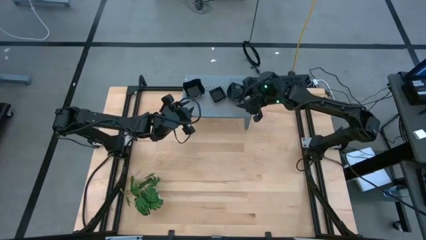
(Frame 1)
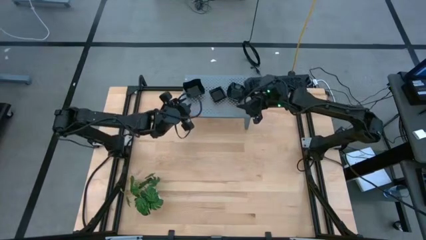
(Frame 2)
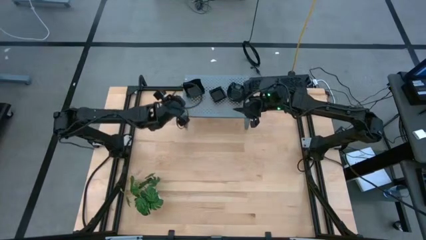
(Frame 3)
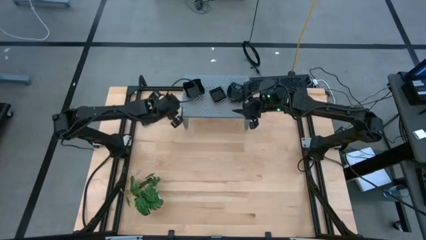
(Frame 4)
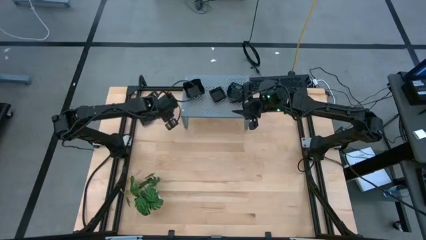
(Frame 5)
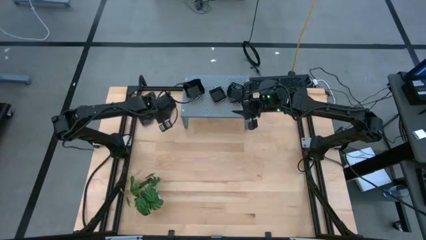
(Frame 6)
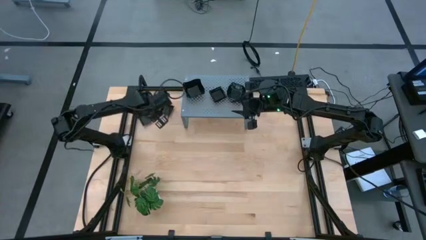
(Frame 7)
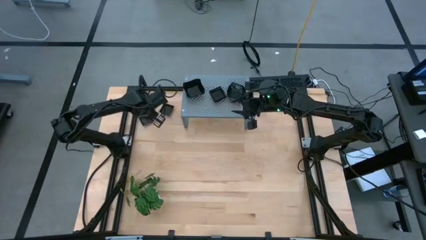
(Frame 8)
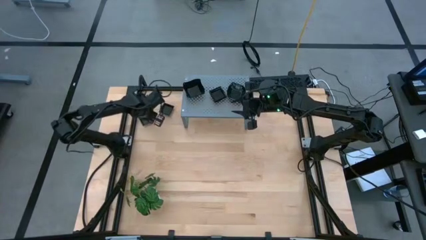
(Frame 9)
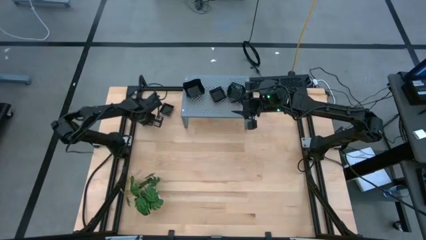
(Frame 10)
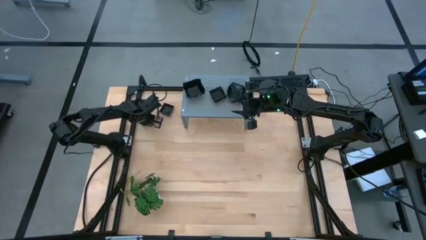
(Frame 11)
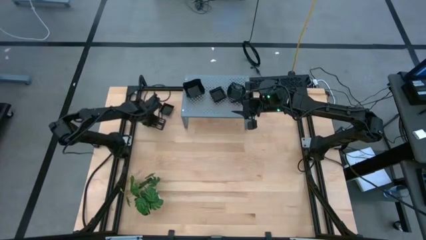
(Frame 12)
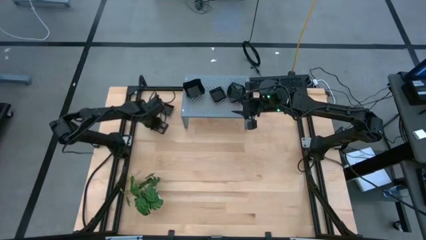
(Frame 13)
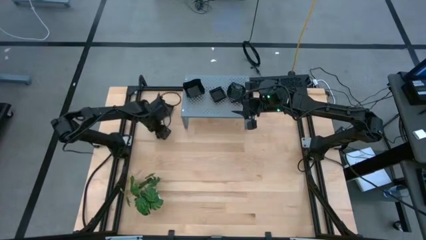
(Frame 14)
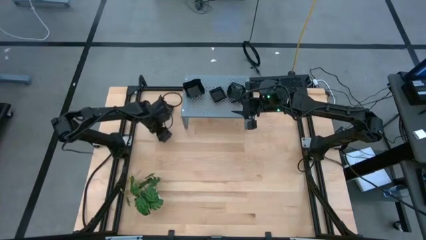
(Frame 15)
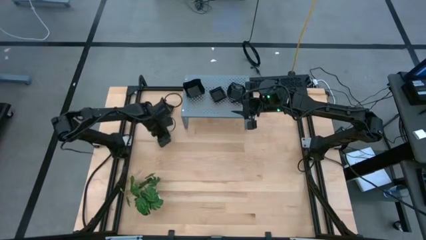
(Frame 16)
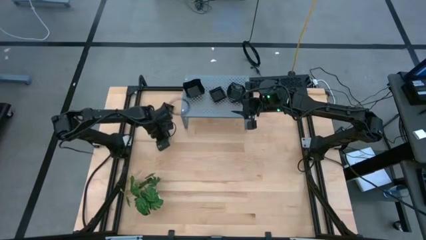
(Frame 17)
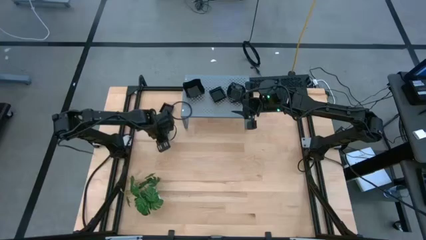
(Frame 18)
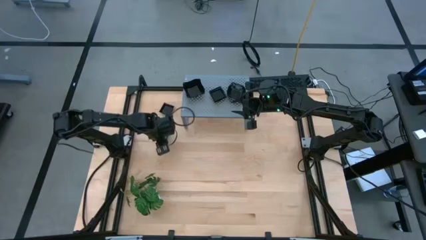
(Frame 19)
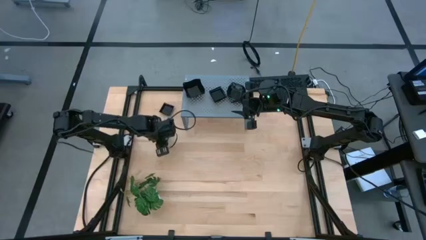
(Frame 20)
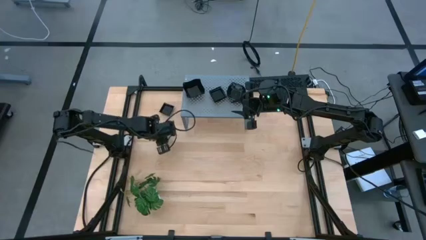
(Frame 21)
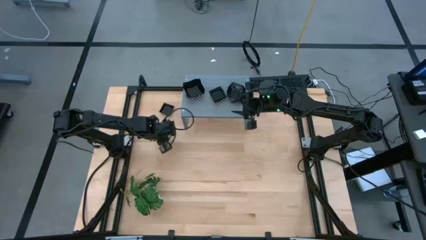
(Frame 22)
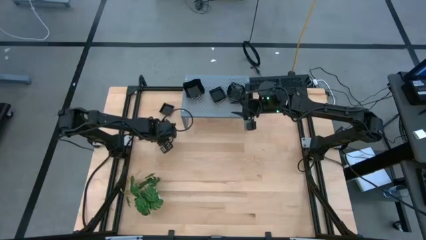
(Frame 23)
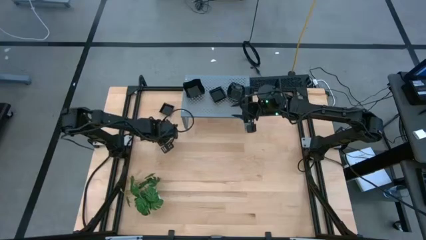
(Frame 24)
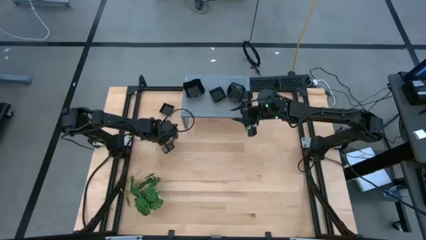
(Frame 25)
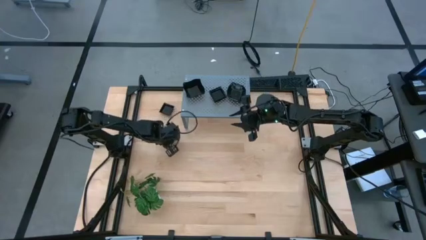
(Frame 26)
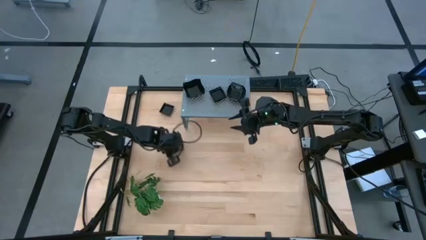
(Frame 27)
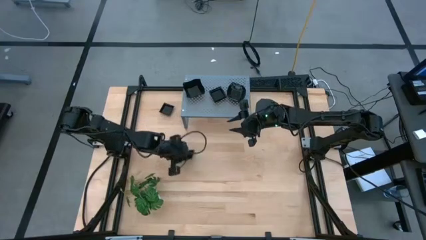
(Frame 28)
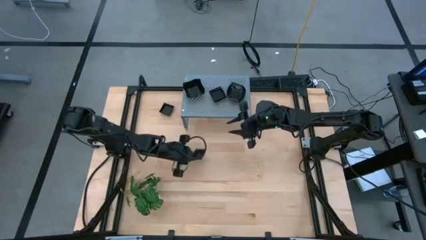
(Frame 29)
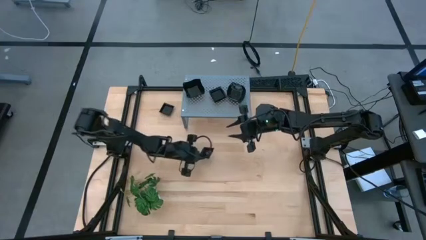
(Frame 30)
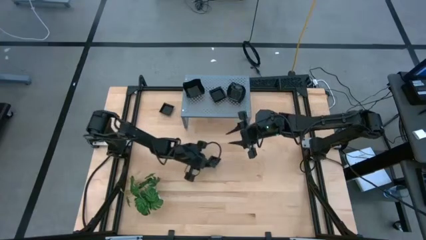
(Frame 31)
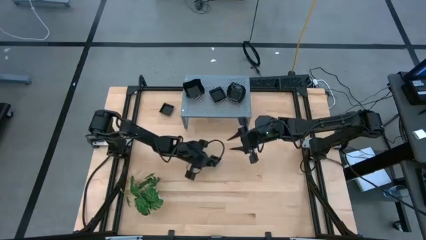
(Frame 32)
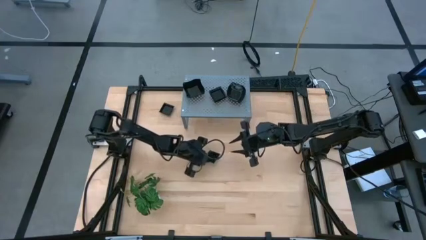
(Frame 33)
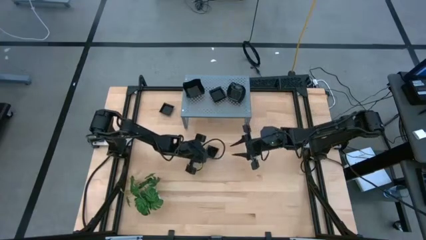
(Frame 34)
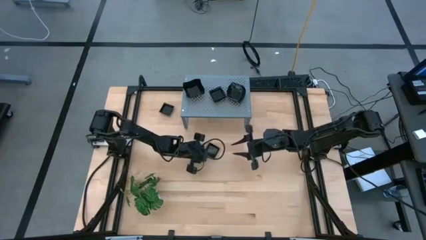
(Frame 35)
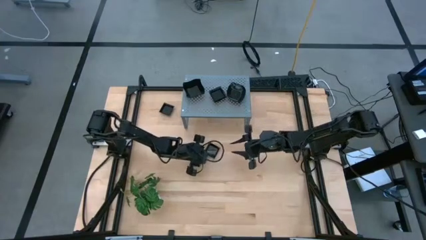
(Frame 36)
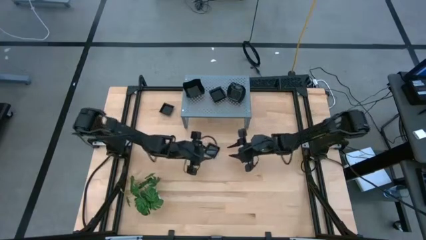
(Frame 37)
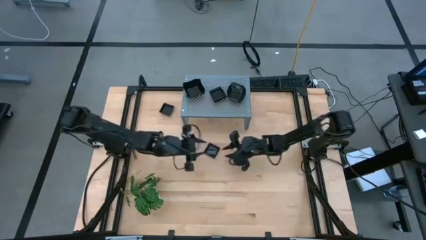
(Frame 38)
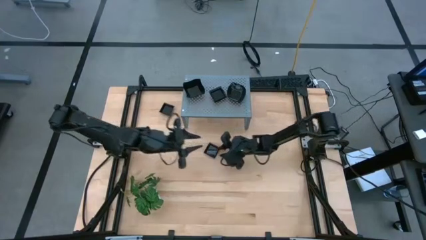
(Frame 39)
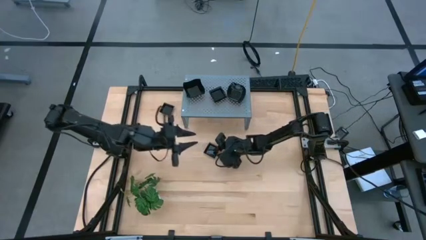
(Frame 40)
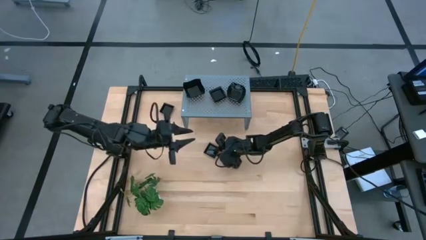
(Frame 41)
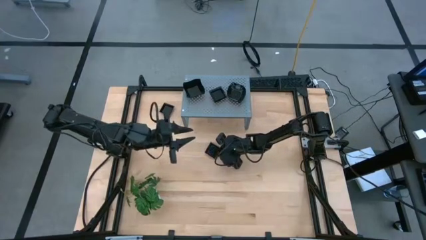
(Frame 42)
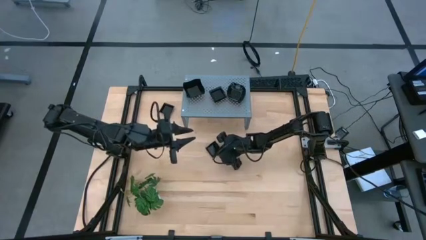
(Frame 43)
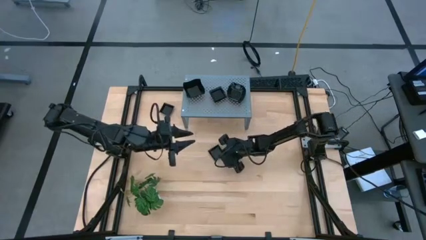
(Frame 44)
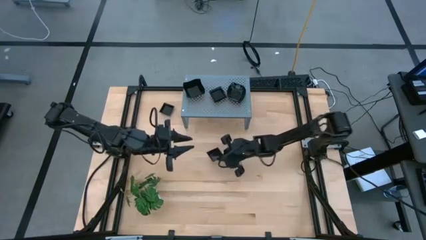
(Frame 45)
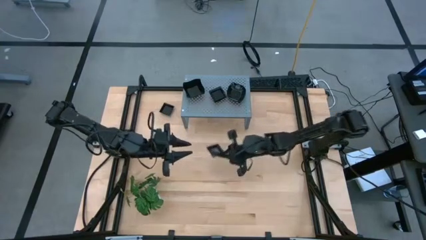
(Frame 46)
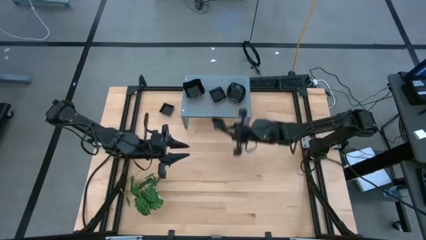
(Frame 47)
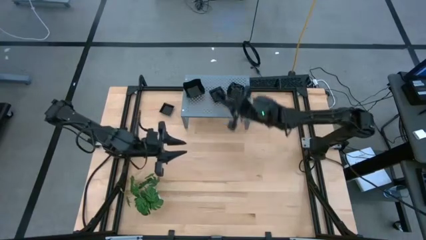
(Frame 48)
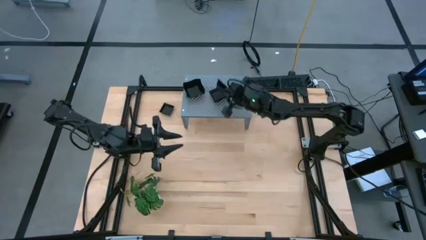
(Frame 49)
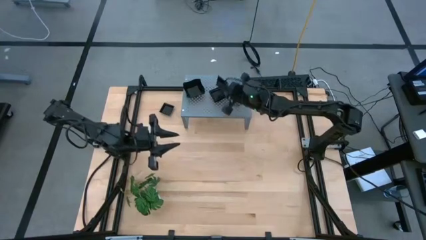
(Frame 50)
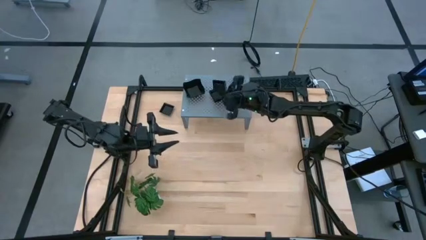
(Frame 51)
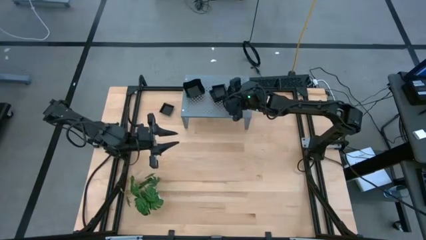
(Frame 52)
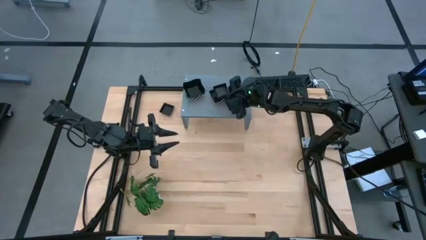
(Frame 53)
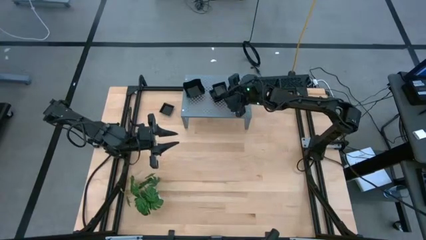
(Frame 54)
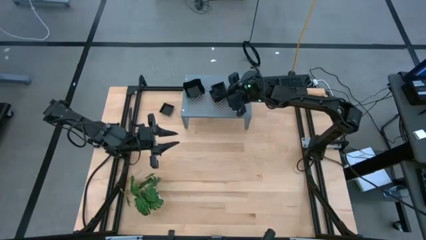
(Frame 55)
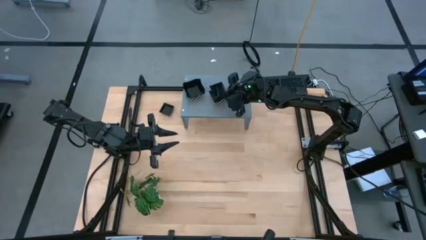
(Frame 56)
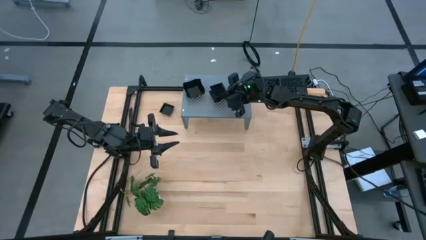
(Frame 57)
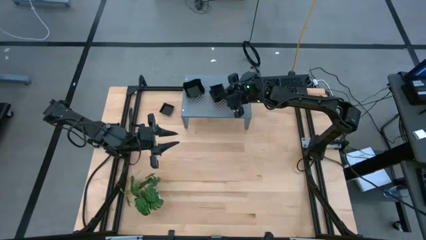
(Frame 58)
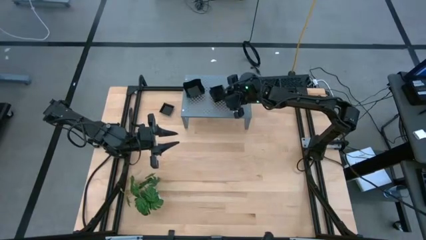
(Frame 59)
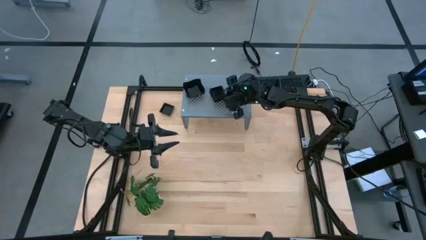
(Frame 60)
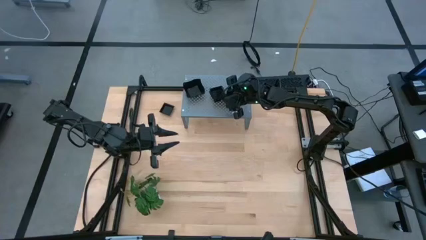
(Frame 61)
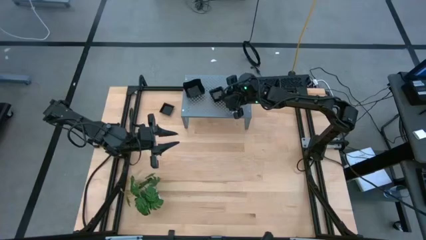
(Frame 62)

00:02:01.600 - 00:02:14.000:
Task: Pick & Place Mini shaped plates
Stack the black square plate on top of the black square plates on the shelf

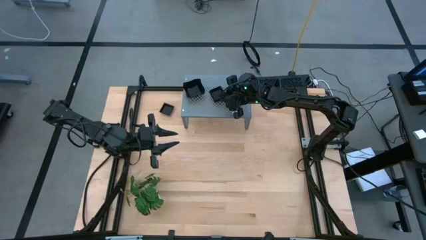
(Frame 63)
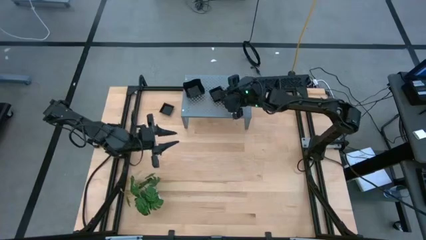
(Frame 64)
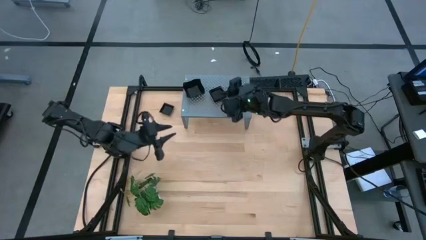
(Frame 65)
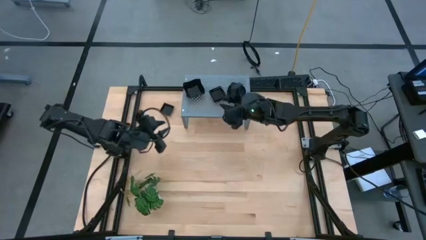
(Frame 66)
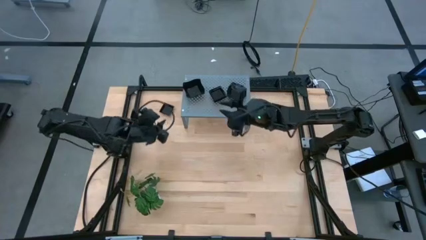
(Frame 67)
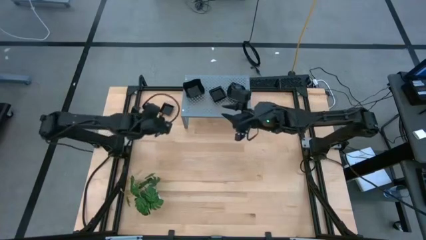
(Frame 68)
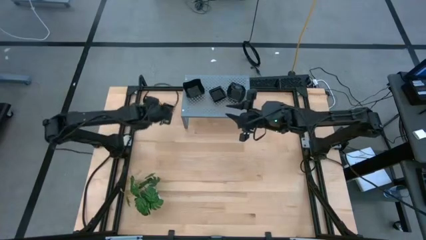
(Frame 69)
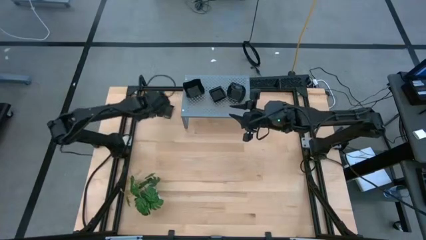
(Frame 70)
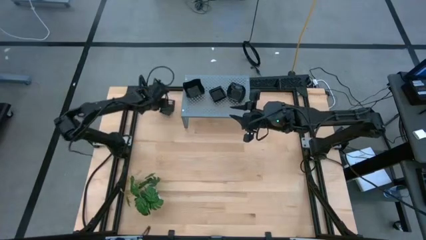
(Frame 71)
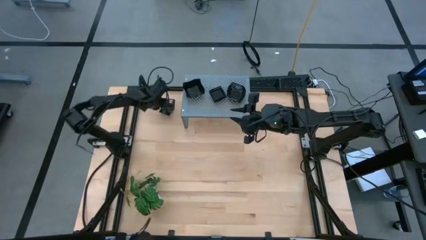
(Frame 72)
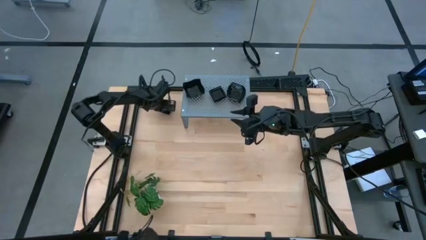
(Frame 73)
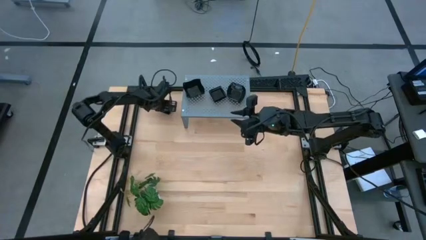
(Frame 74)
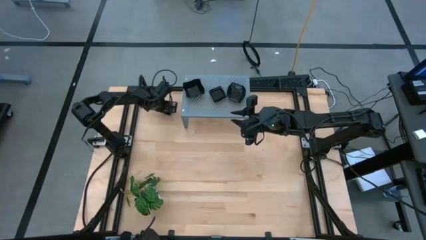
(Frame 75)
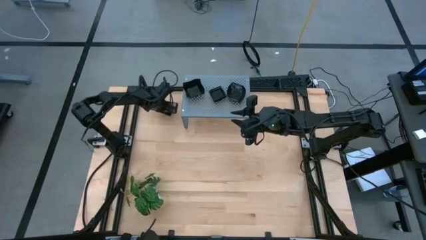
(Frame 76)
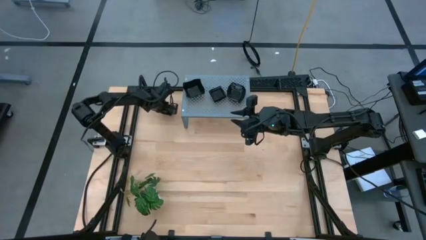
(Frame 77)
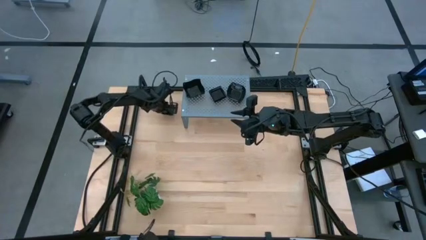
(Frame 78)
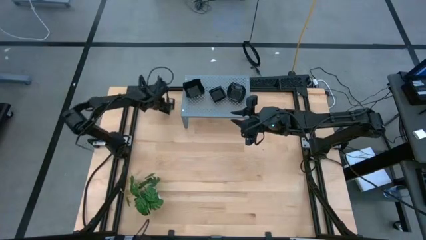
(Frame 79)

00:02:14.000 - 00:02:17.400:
Stack the black square plate on top of the black square plates on the shelf
